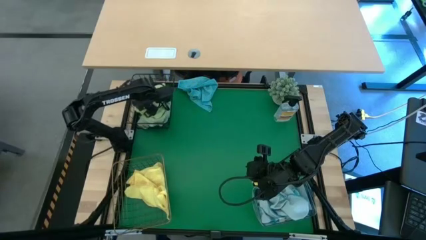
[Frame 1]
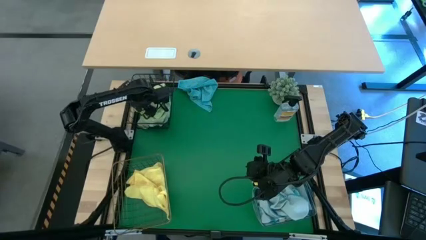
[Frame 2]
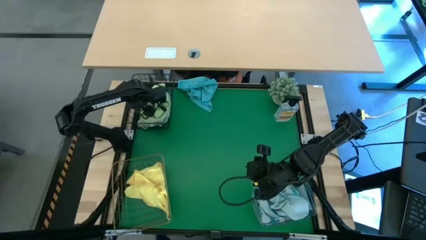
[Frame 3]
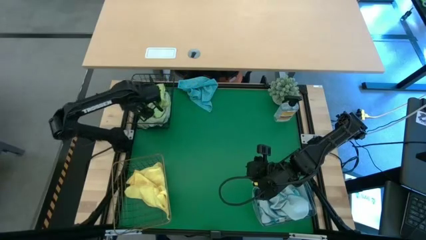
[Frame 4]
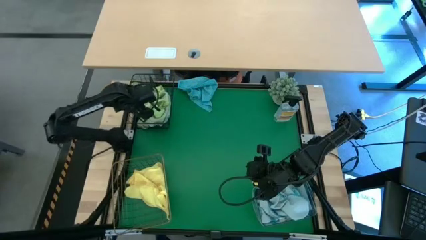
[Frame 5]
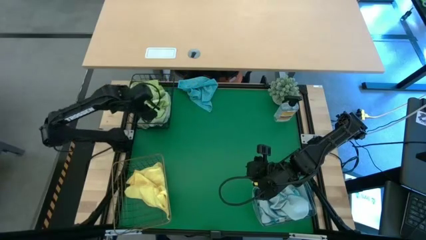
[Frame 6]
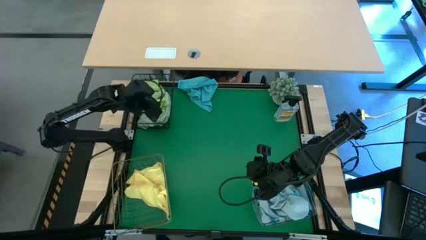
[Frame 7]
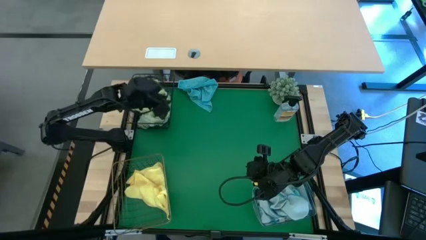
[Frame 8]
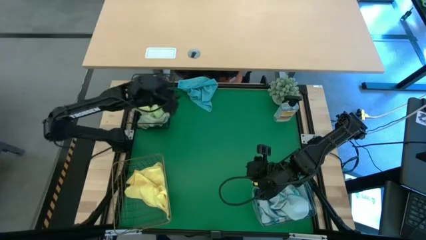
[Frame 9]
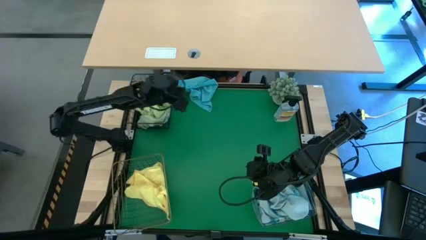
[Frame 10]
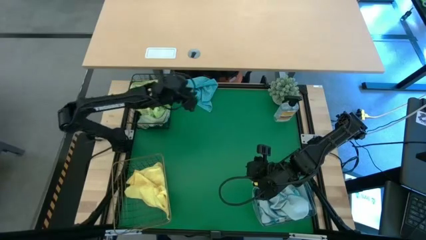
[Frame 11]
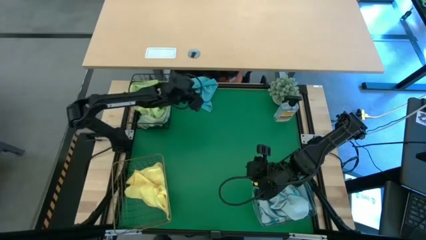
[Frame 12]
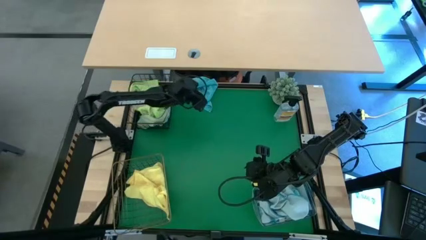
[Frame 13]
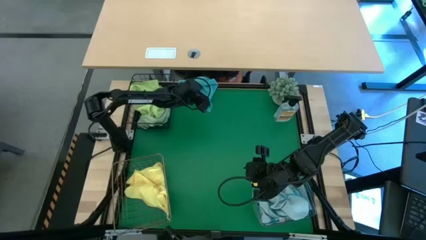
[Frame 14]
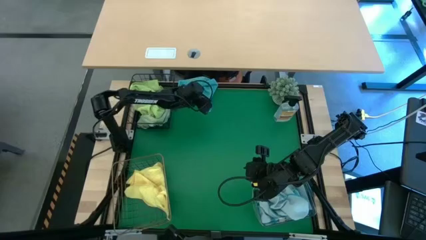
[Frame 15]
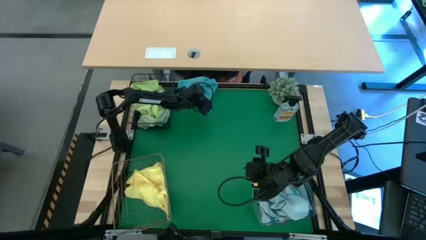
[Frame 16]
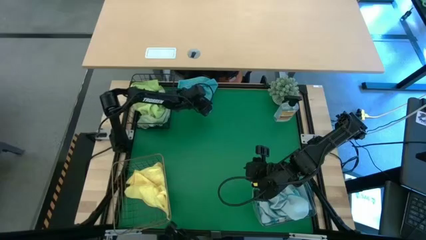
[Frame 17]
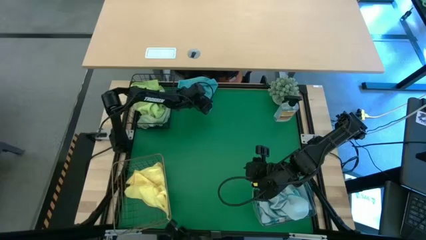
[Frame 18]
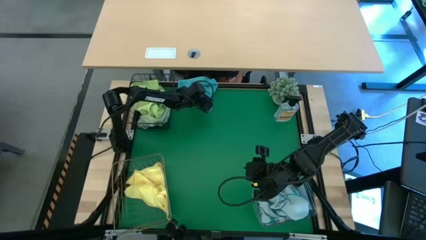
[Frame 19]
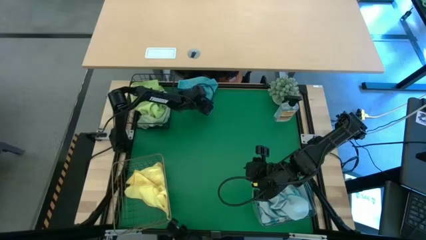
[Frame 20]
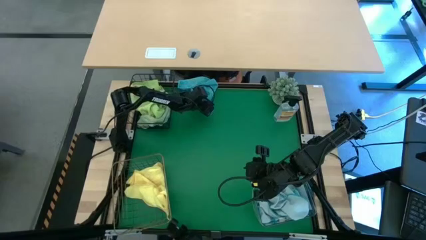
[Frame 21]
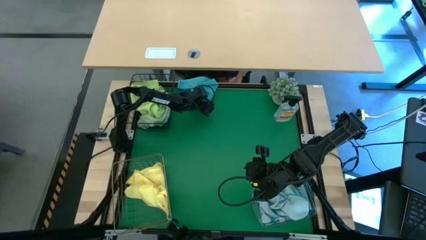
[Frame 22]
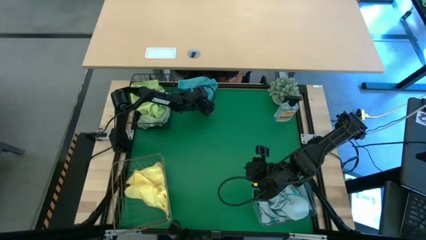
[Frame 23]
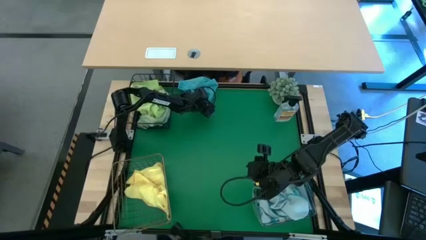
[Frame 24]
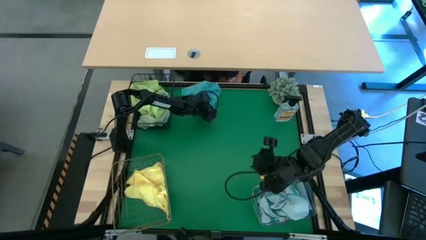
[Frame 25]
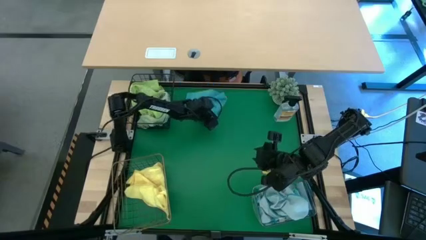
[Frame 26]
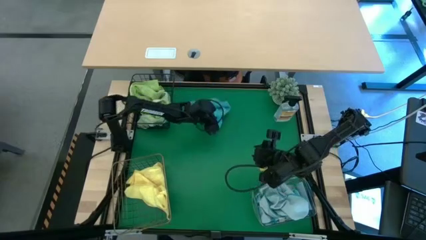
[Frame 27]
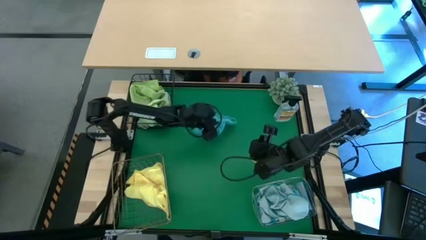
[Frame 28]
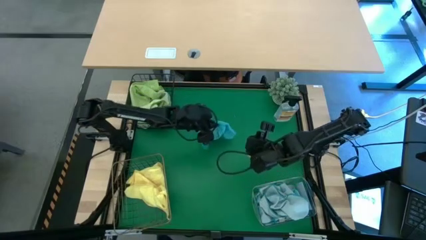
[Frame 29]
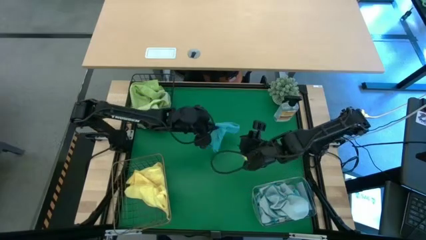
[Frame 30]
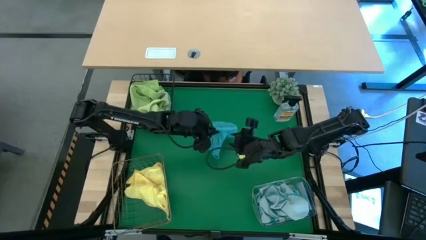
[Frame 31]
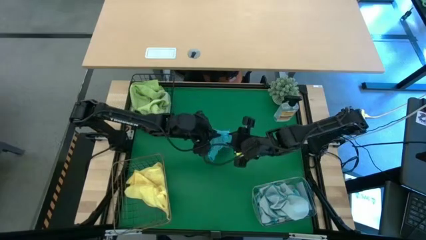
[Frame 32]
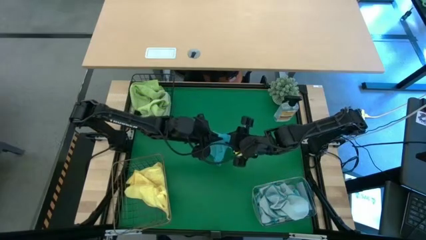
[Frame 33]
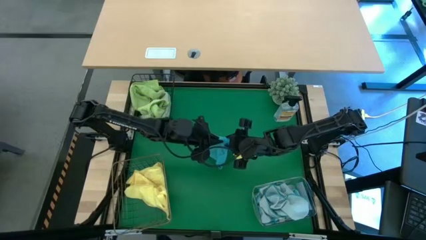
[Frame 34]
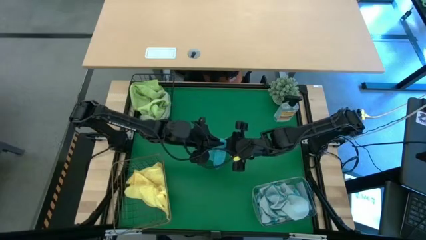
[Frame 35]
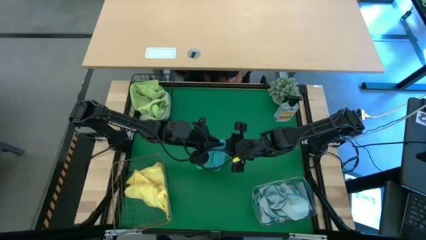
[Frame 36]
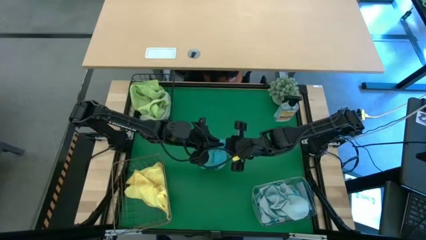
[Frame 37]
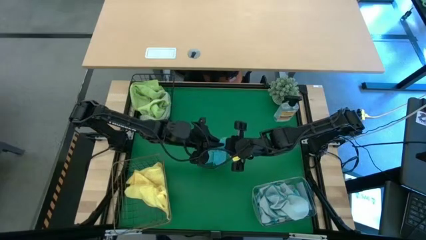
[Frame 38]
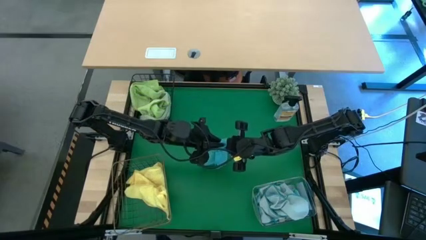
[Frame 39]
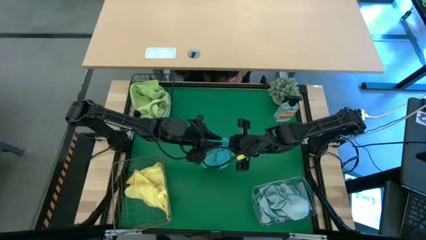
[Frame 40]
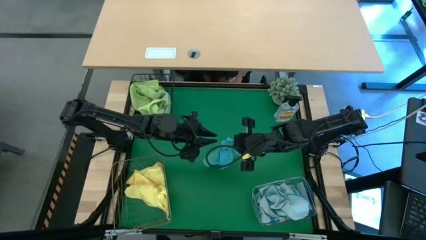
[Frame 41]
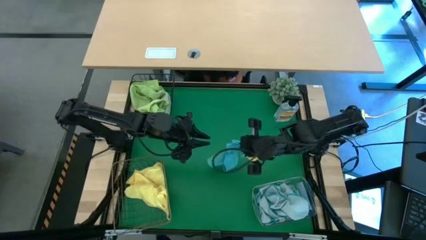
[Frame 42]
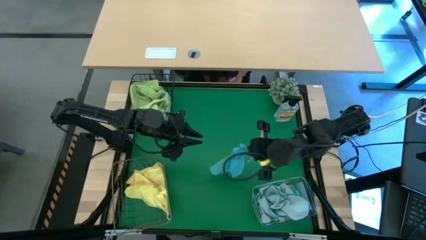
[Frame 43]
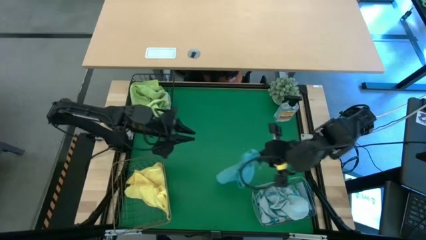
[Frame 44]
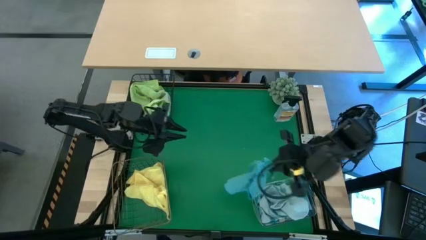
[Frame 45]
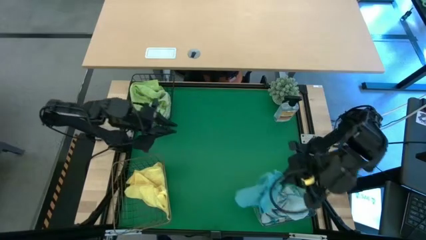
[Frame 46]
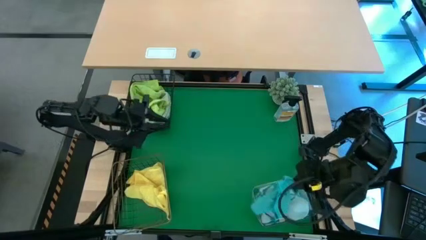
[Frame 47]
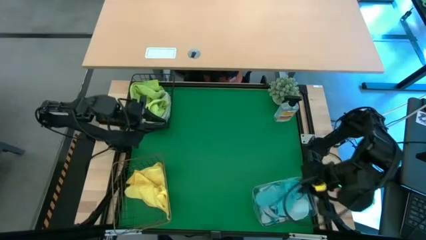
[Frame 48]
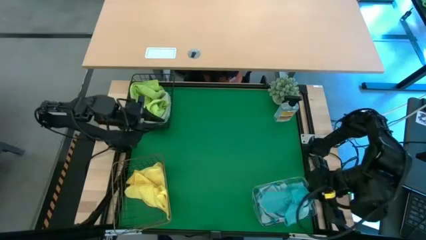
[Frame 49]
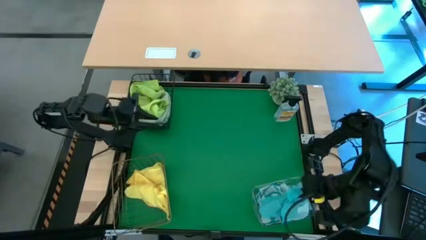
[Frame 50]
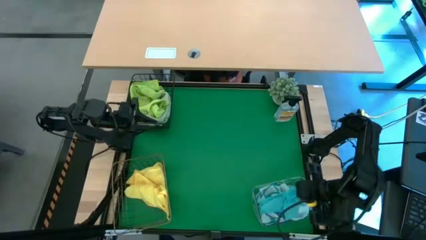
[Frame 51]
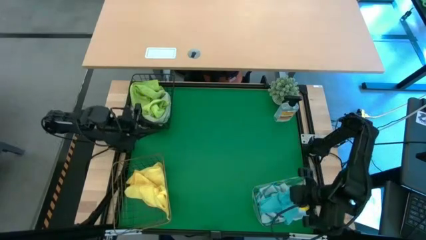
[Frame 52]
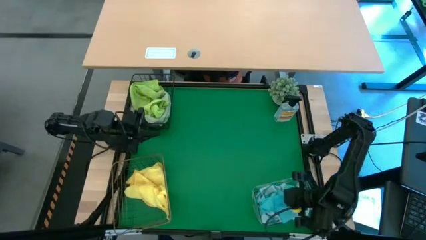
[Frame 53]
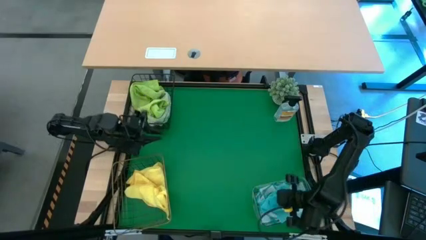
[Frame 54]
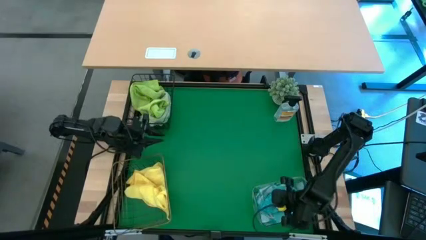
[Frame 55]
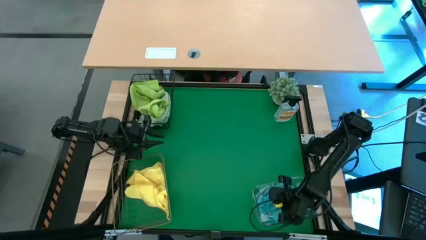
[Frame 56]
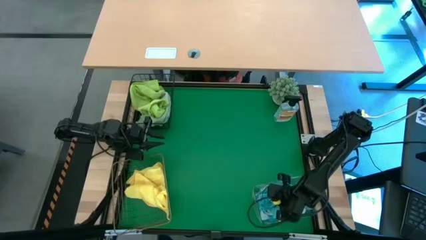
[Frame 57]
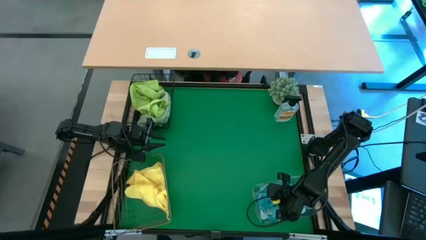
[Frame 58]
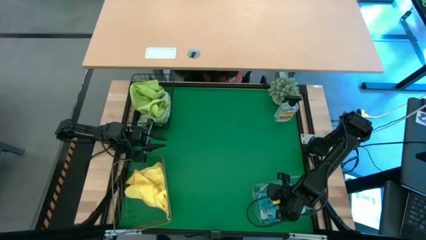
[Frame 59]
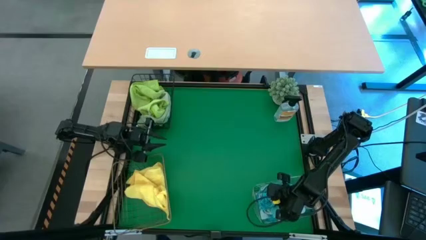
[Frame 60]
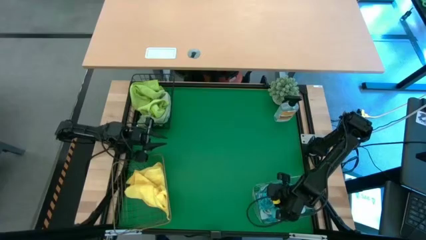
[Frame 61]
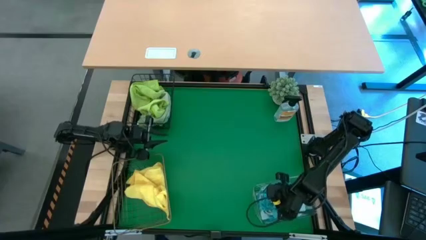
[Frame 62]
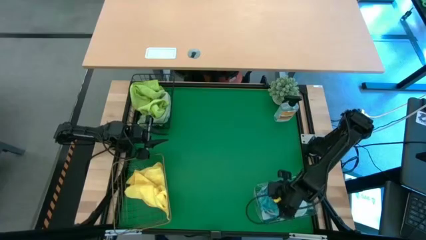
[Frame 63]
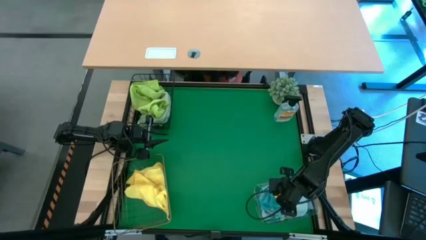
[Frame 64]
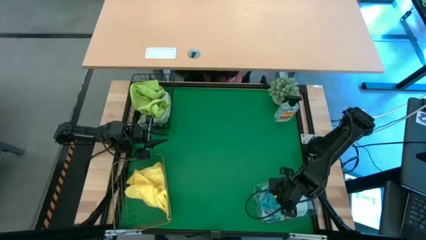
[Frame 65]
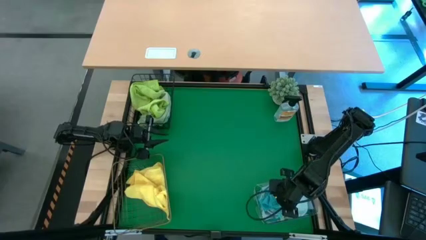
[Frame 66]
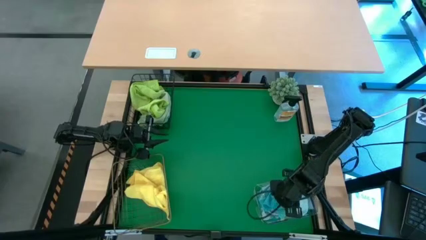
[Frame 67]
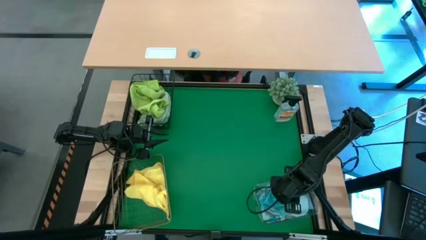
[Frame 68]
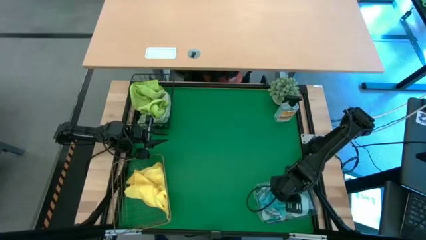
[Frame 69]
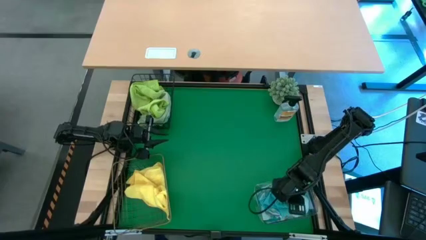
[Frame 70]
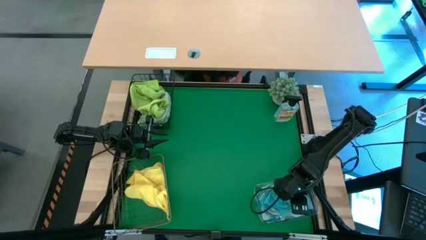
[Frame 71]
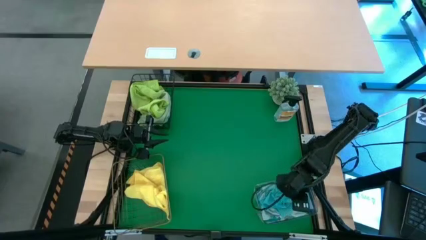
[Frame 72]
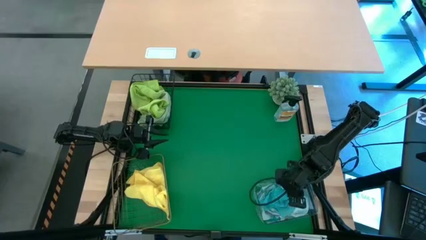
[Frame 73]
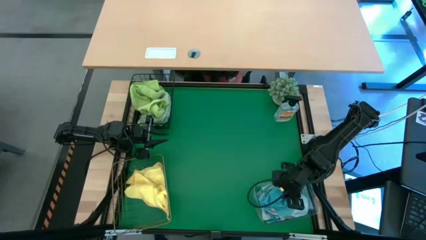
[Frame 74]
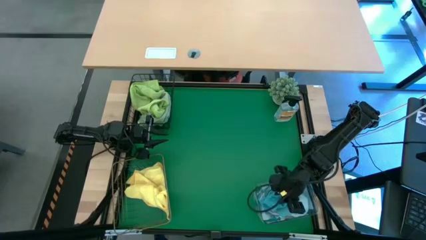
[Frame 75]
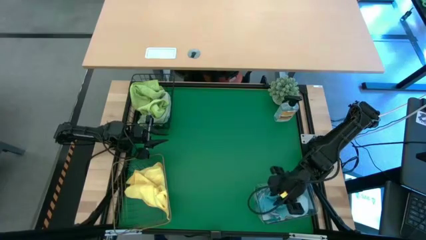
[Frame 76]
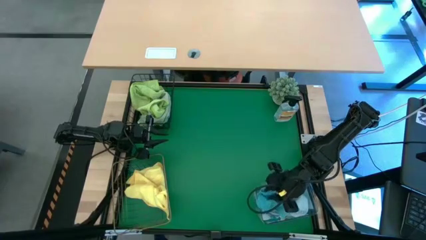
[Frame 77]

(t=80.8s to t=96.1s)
Task: Sort microfiber towel by color & place in baskets
Put the blue microfiber cloth into the transparent bin
